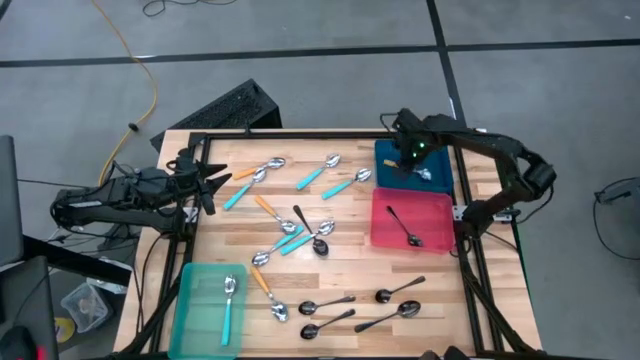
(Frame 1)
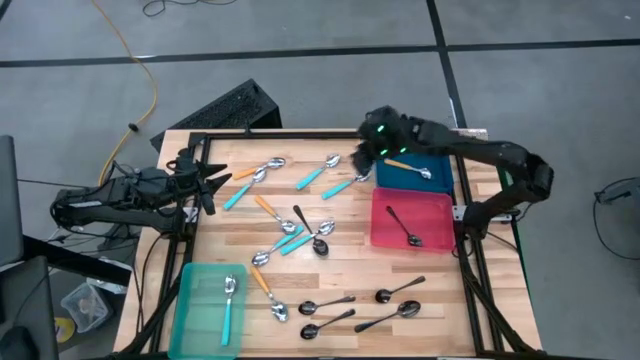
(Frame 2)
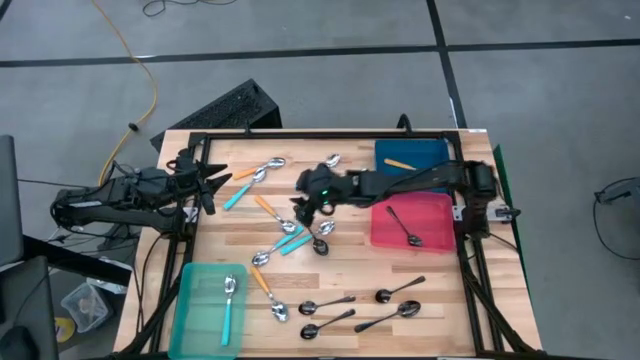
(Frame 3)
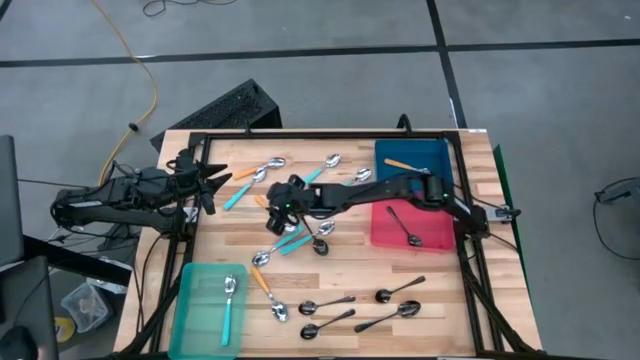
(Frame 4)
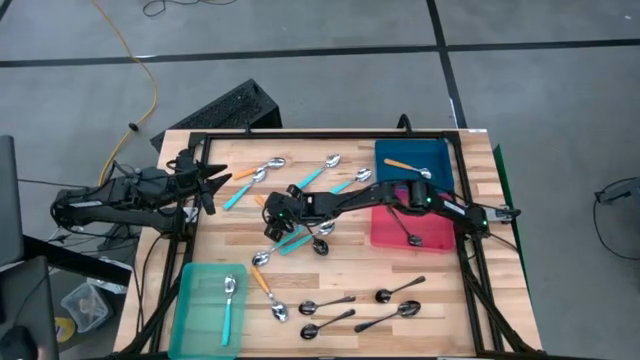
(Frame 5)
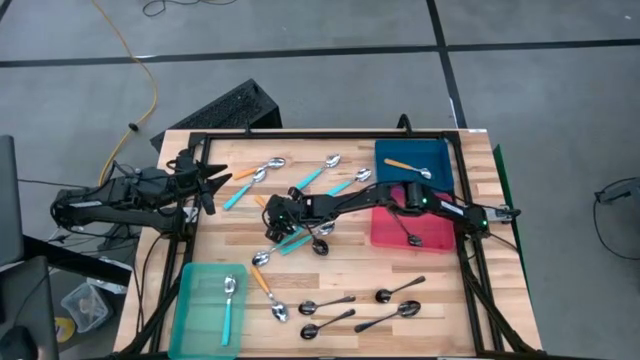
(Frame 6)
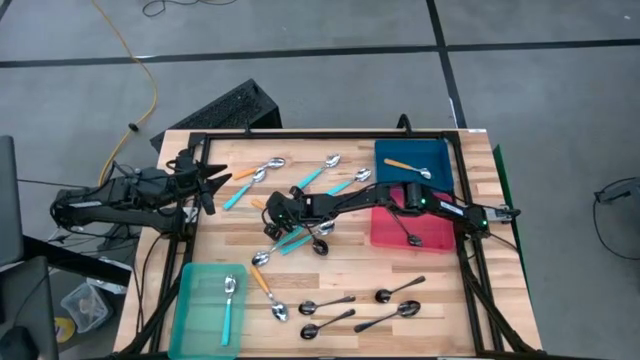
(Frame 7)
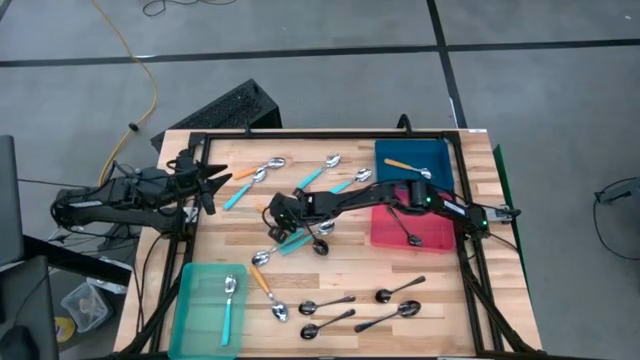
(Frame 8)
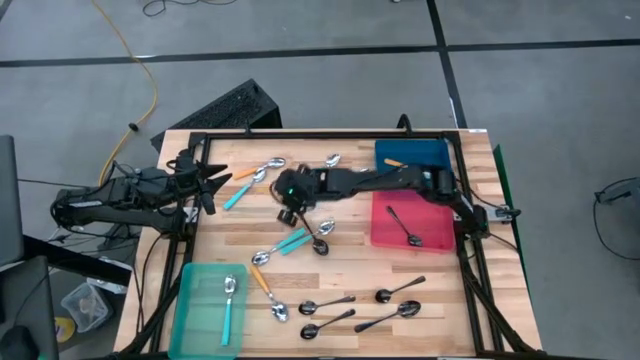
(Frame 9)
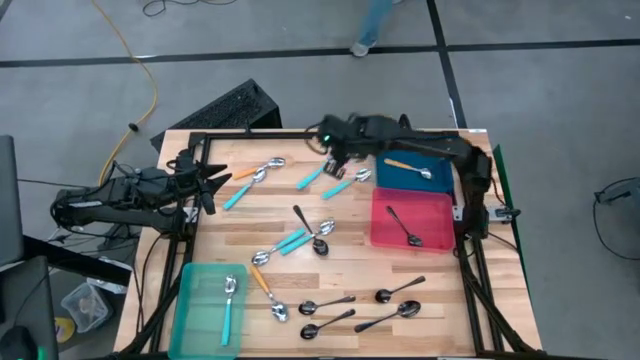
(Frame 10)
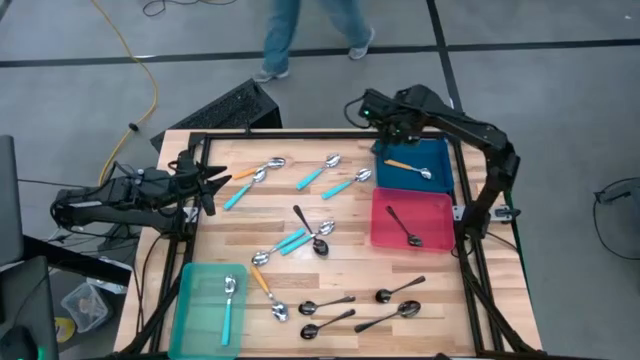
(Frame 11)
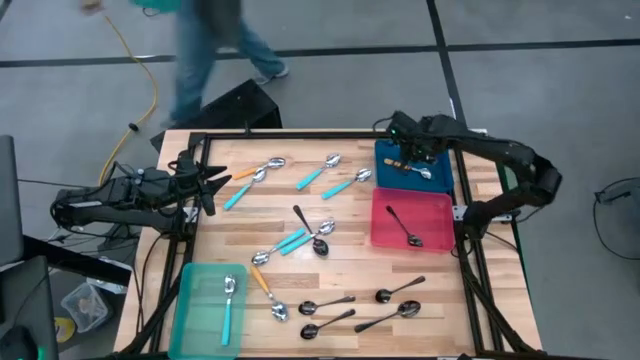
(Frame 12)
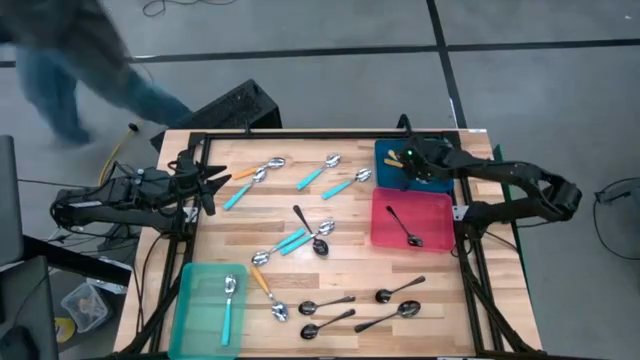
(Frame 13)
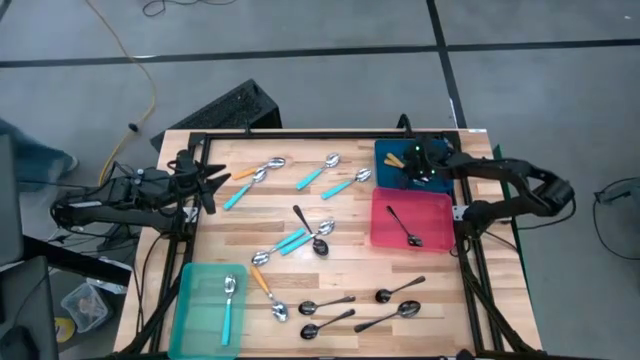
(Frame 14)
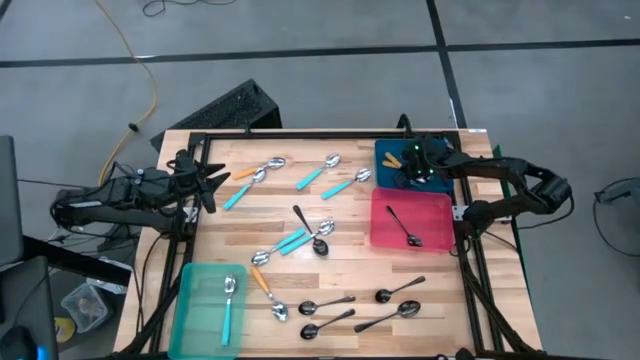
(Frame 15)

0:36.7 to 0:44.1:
Task: Sort silverware by color (type)
Put the yellow spoon into the blue bin

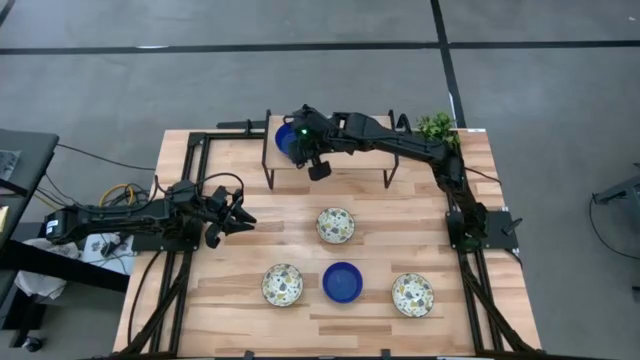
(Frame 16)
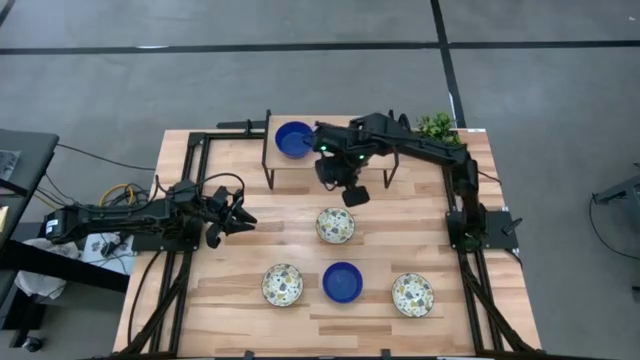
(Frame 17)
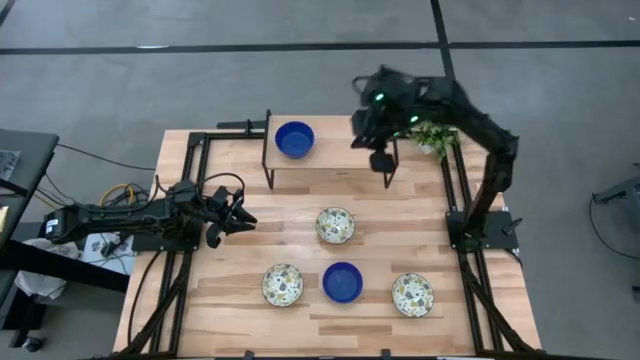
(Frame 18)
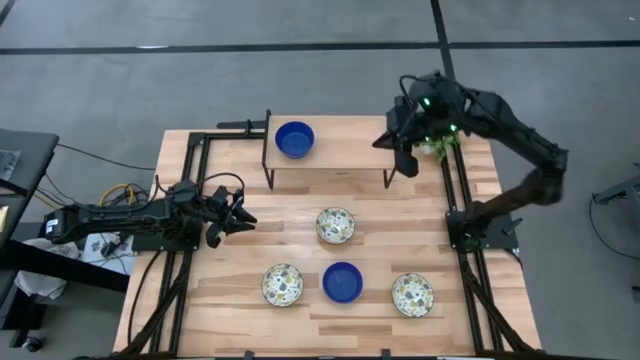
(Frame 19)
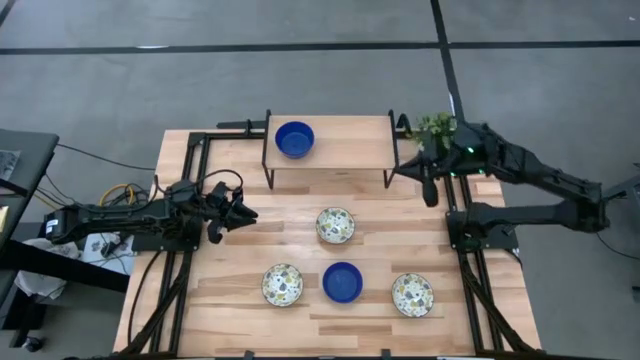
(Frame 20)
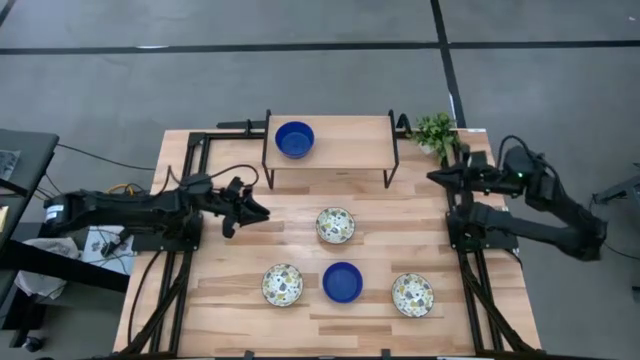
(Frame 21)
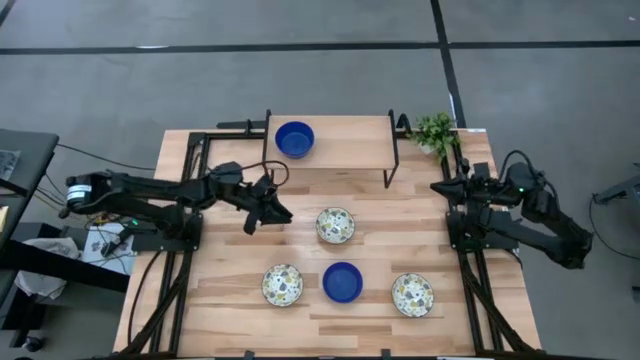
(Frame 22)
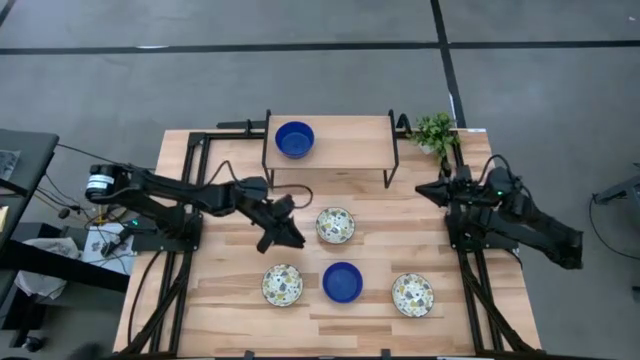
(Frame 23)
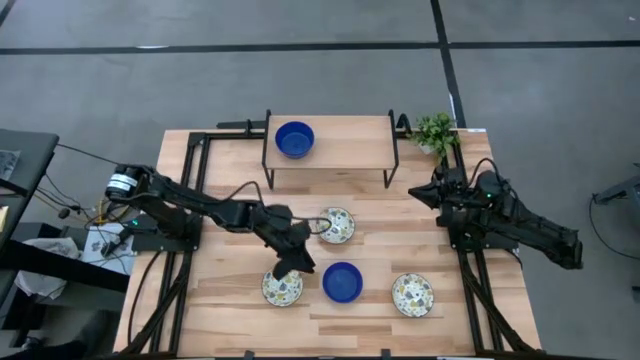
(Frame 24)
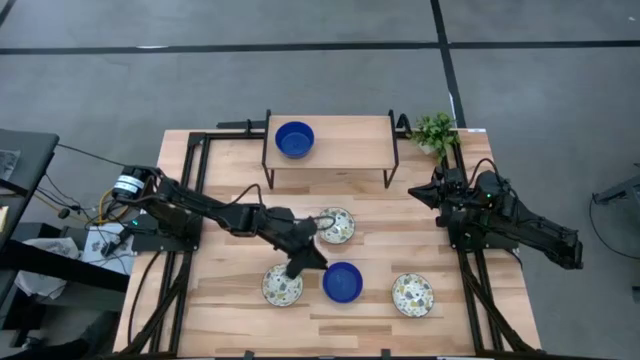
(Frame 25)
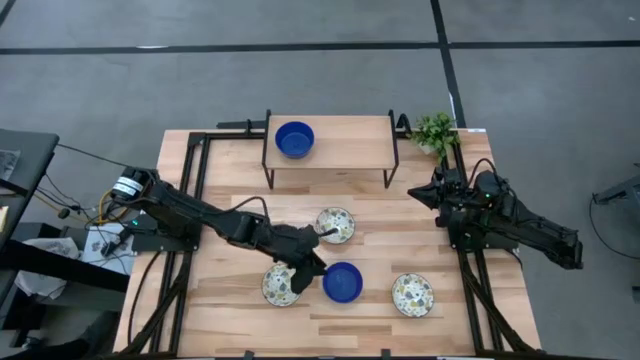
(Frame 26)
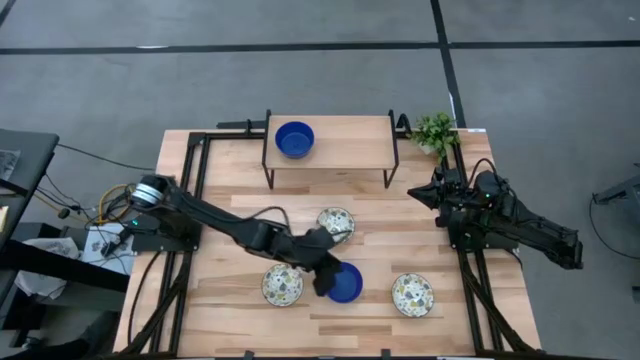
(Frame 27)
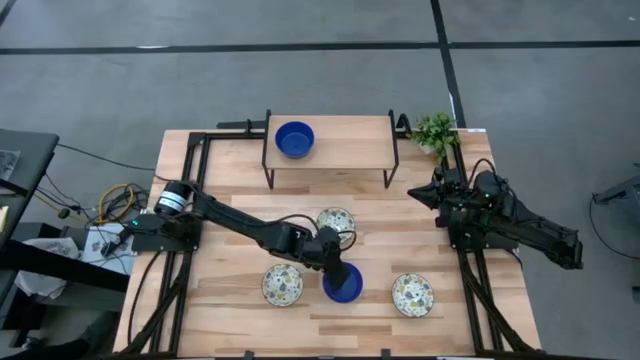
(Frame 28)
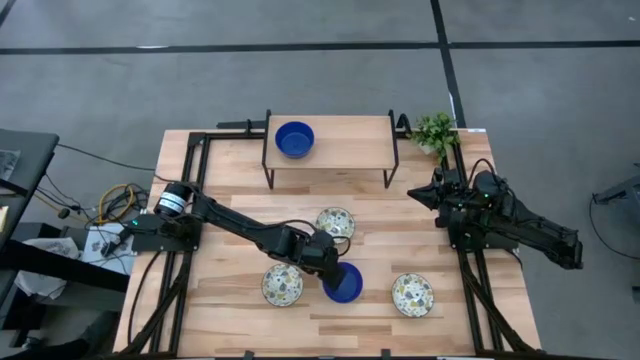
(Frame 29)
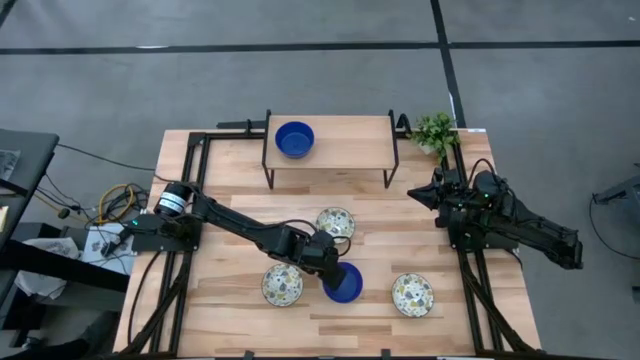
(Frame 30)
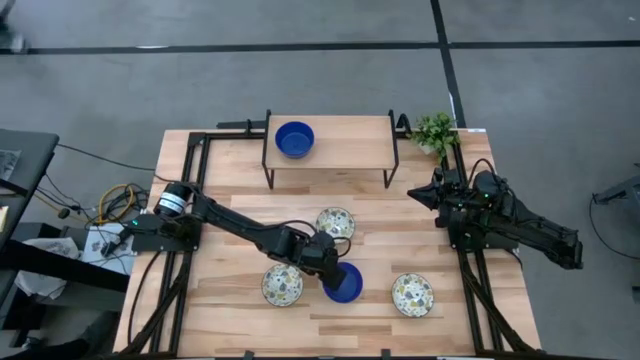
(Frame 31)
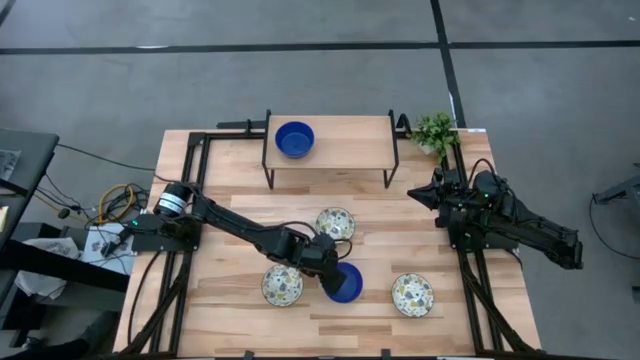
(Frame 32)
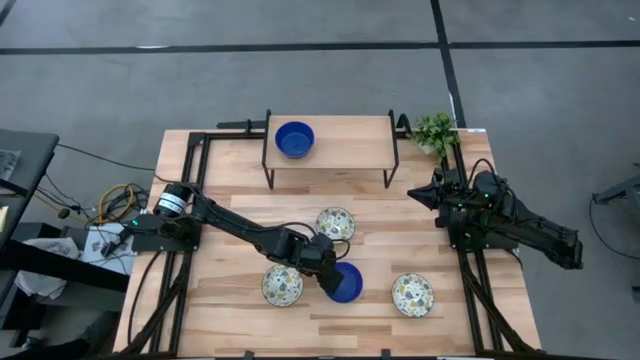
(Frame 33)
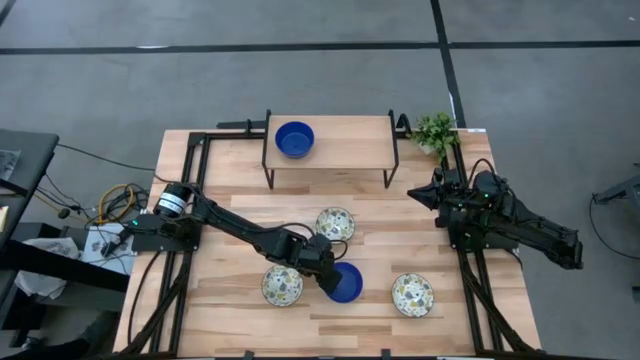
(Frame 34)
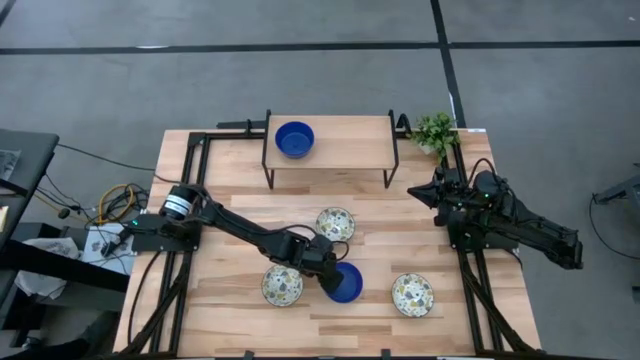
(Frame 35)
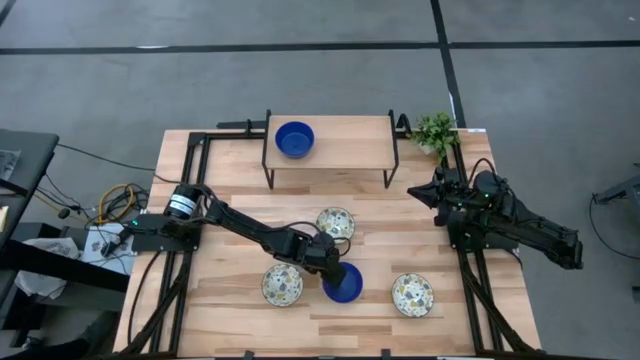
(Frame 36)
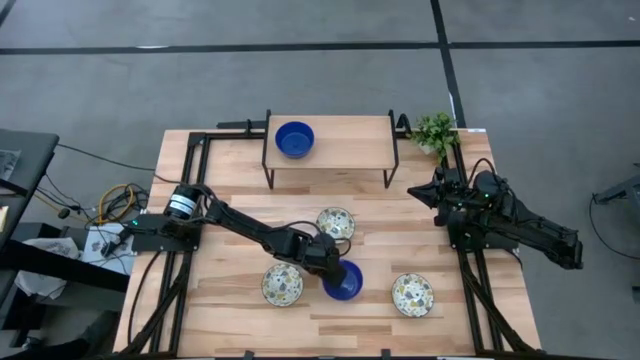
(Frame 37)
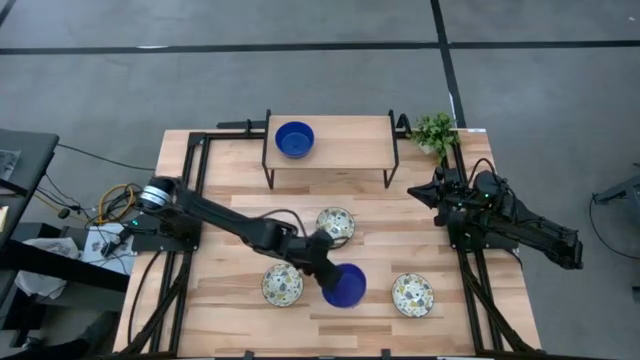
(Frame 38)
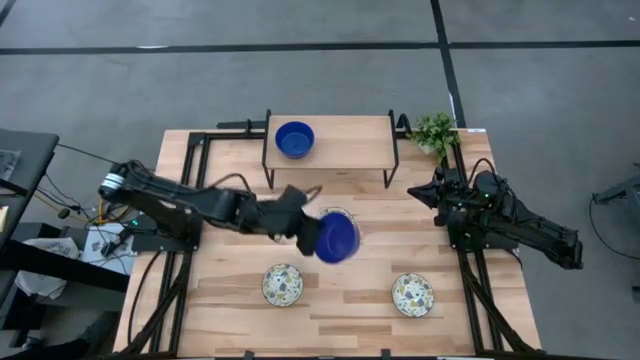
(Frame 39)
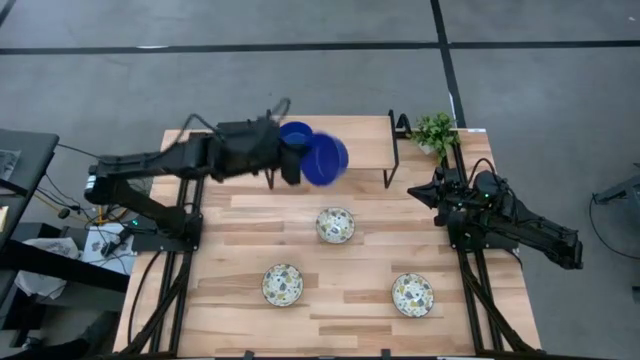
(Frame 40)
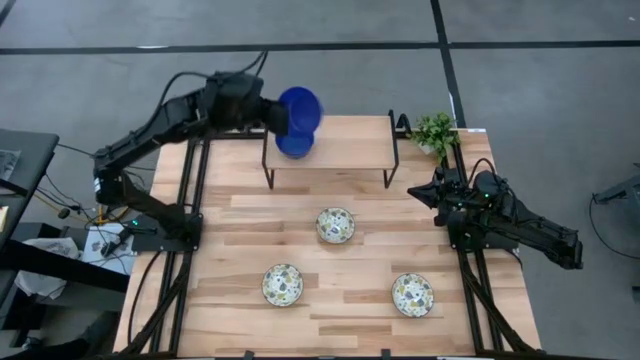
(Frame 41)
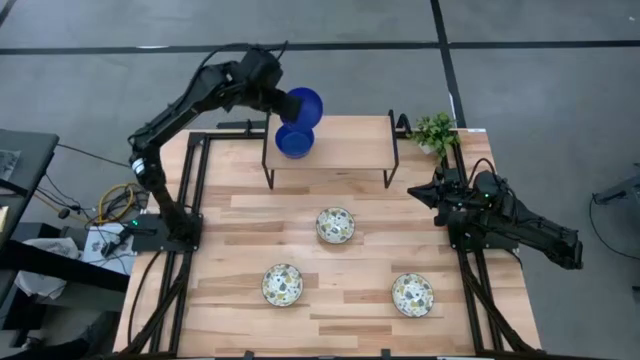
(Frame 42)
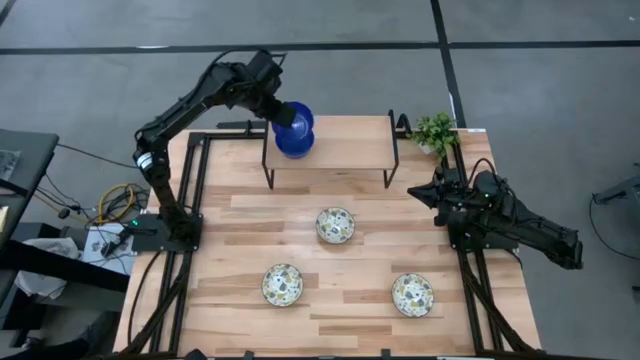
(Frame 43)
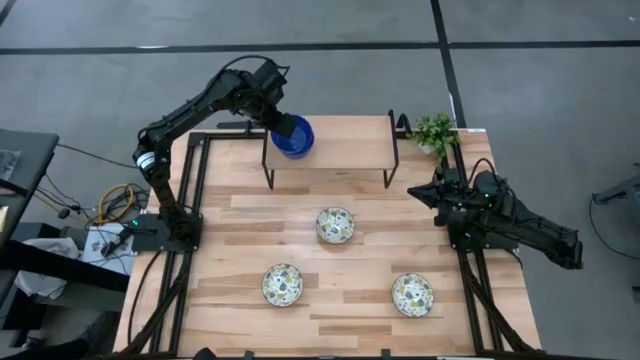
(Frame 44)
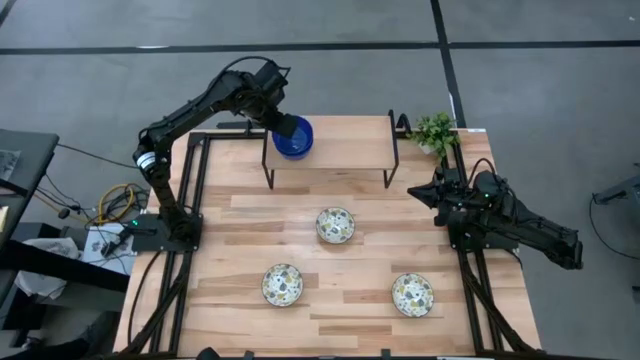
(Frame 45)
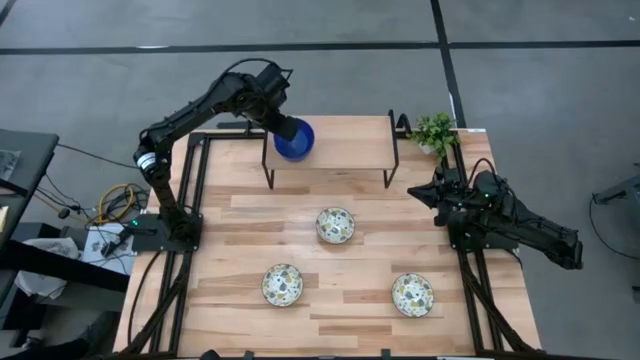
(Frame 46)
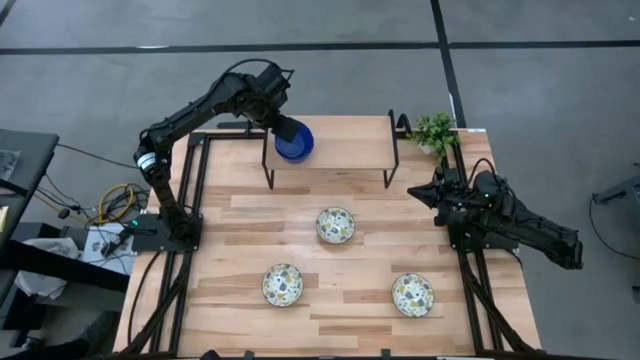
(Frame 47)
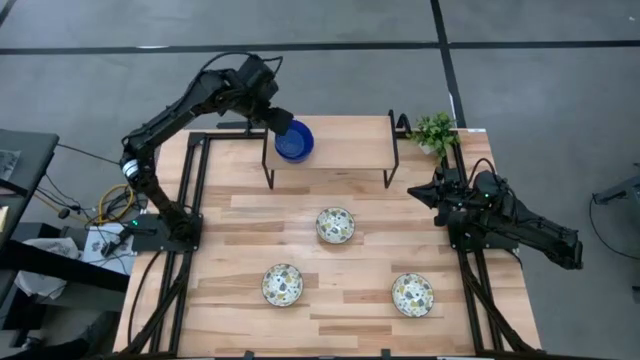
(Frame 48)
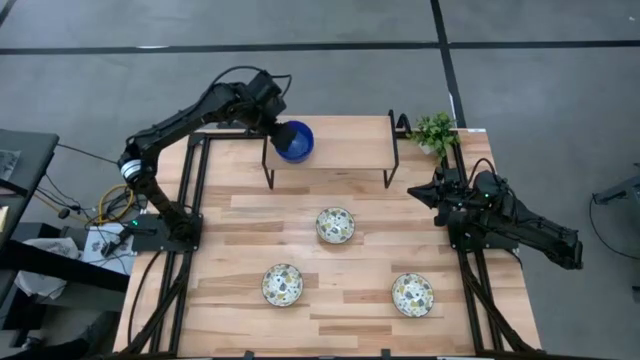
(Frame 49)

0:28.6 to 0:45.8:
Task: Pick & Place Mini bowls
Stack the blue bowl on the blue bowls on the shelf
